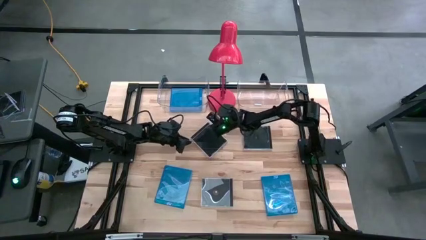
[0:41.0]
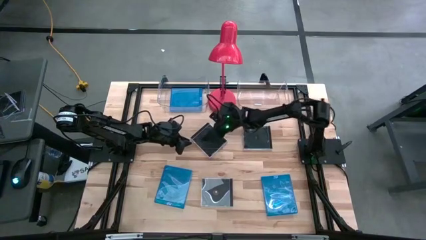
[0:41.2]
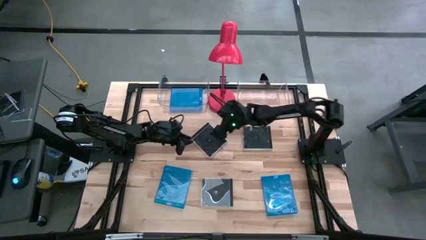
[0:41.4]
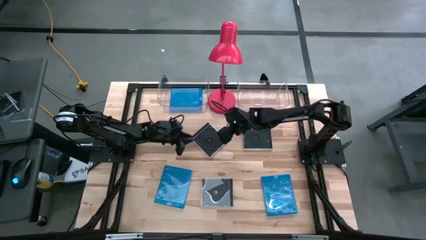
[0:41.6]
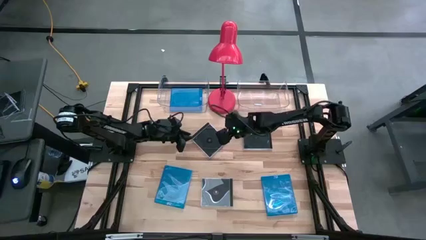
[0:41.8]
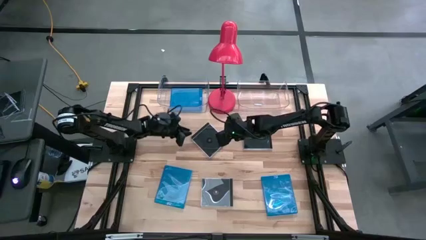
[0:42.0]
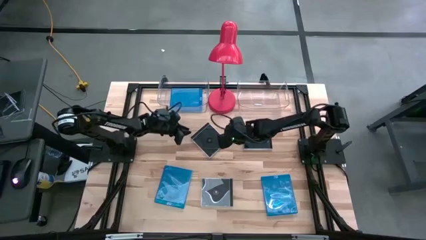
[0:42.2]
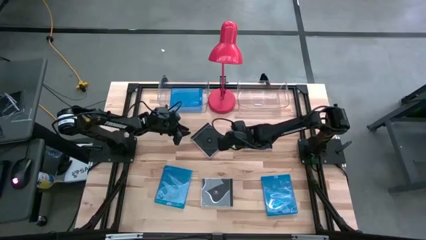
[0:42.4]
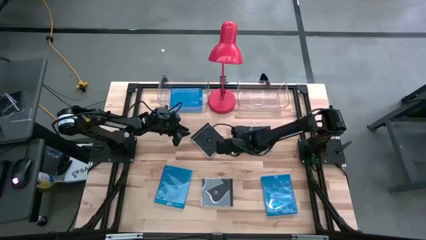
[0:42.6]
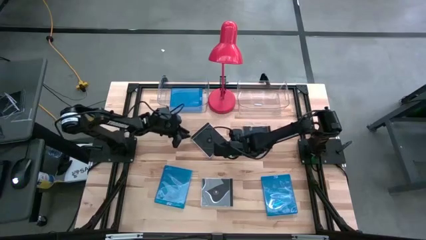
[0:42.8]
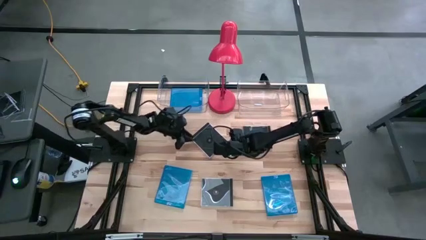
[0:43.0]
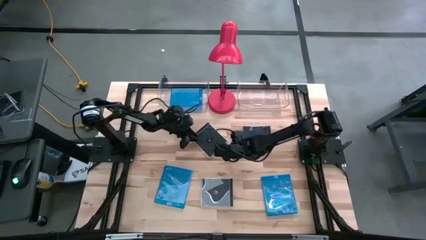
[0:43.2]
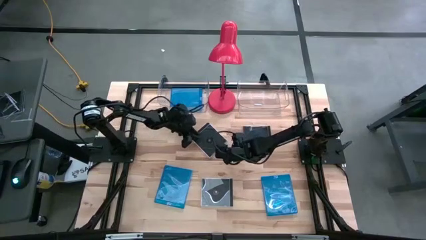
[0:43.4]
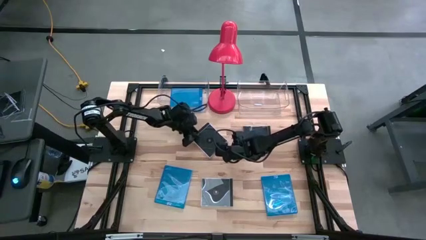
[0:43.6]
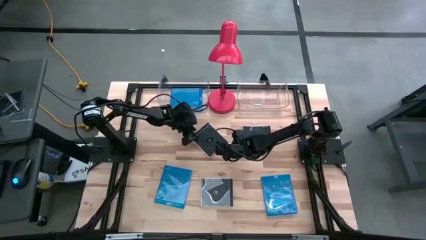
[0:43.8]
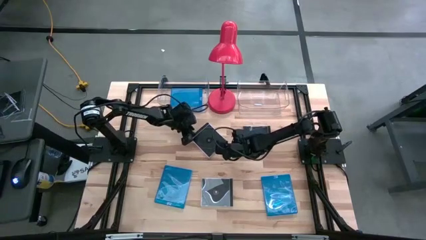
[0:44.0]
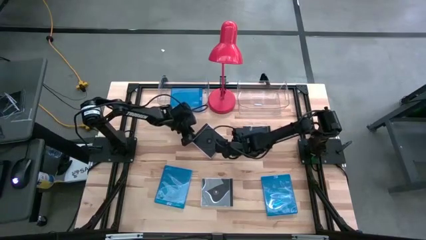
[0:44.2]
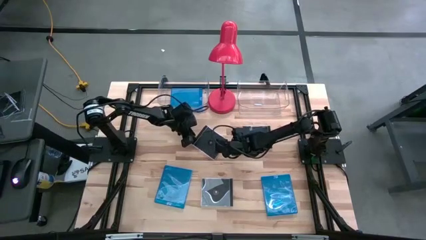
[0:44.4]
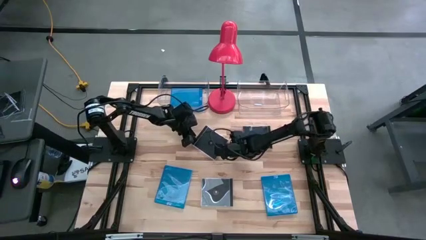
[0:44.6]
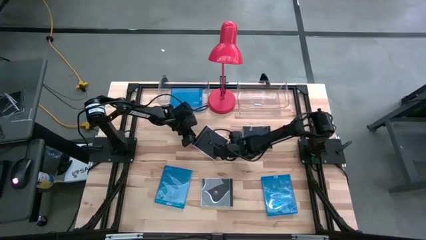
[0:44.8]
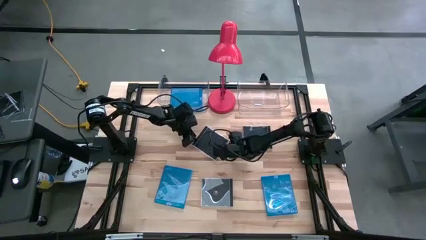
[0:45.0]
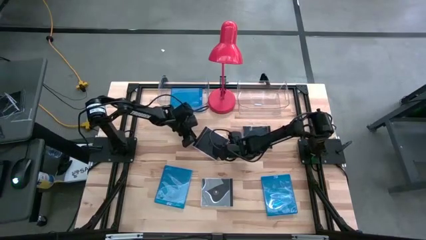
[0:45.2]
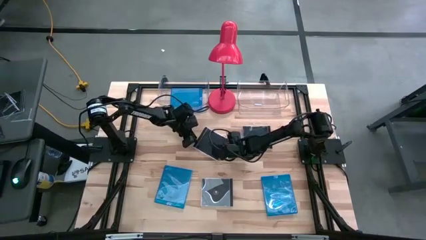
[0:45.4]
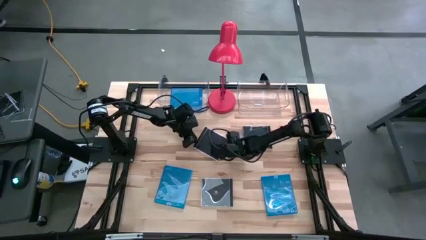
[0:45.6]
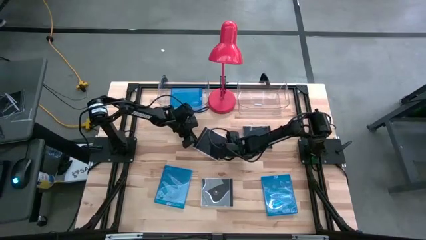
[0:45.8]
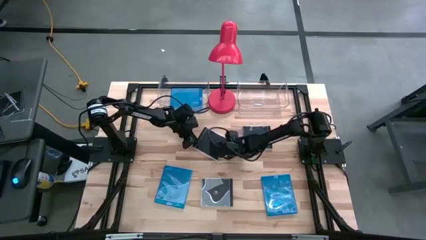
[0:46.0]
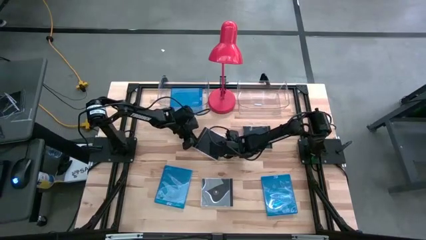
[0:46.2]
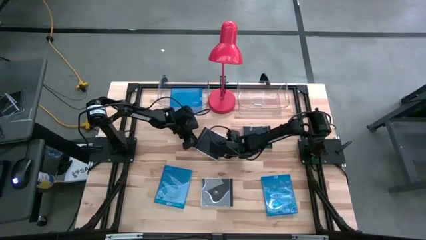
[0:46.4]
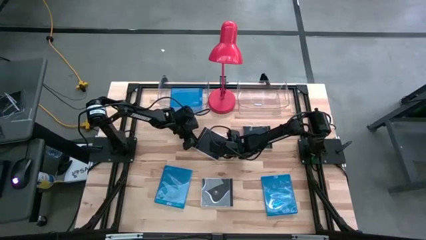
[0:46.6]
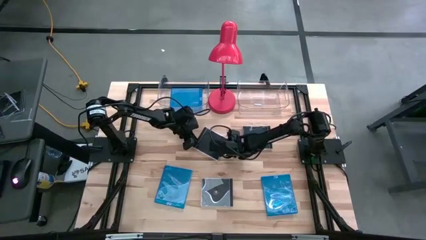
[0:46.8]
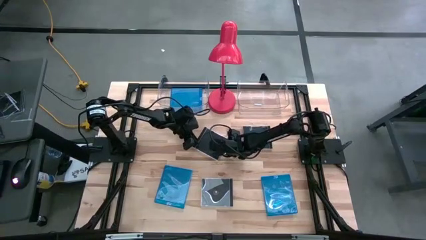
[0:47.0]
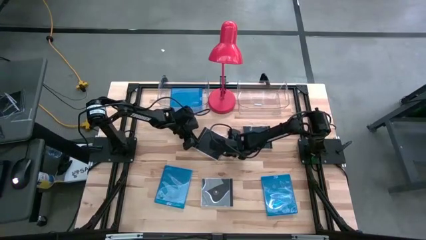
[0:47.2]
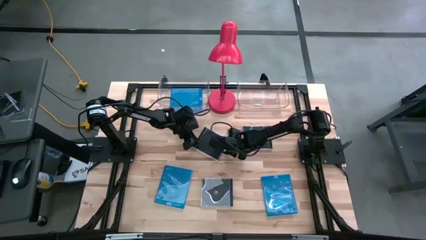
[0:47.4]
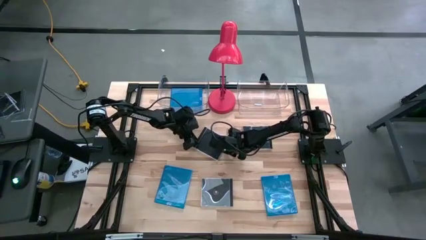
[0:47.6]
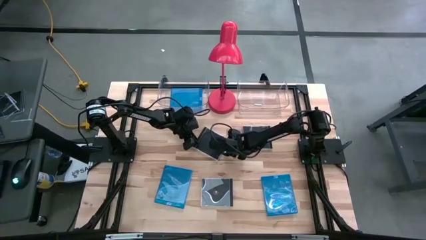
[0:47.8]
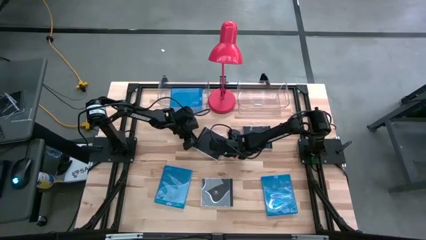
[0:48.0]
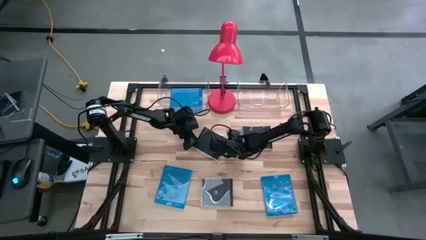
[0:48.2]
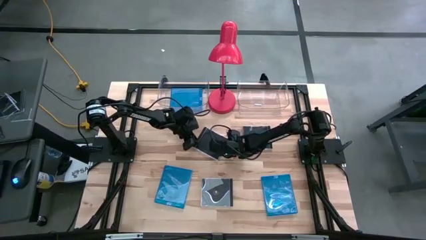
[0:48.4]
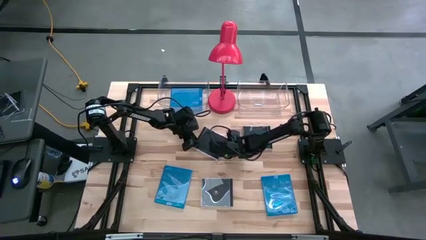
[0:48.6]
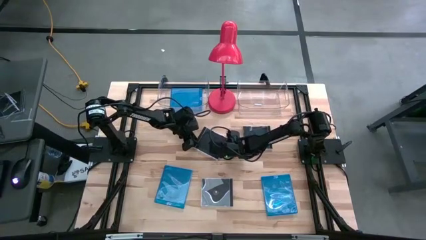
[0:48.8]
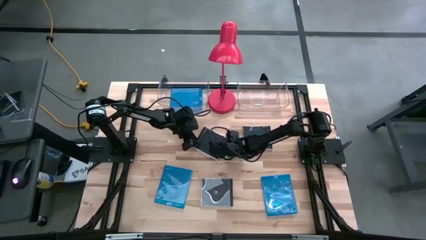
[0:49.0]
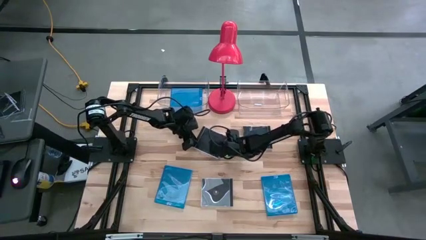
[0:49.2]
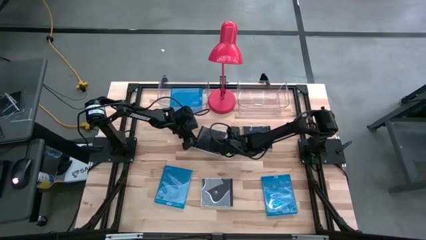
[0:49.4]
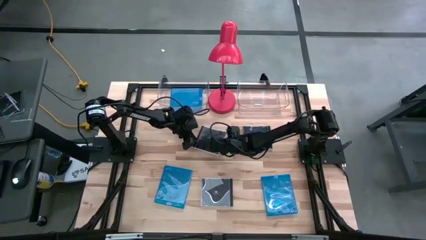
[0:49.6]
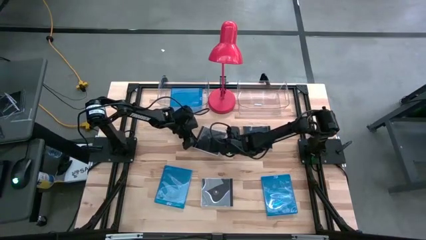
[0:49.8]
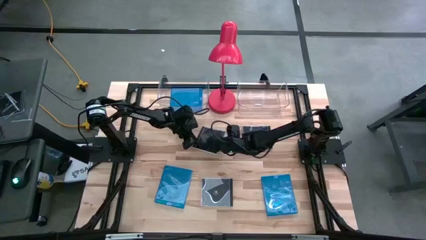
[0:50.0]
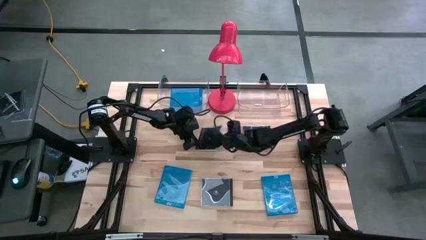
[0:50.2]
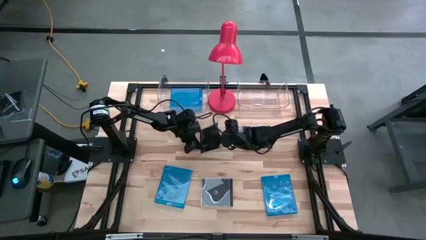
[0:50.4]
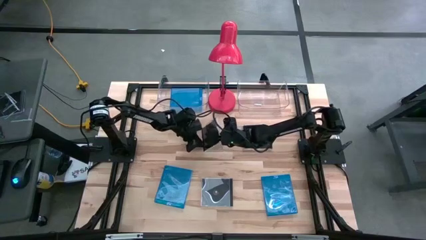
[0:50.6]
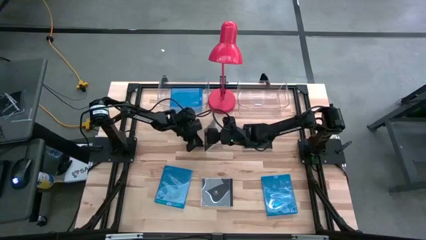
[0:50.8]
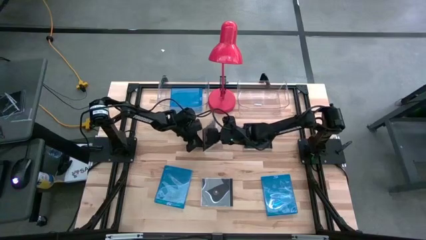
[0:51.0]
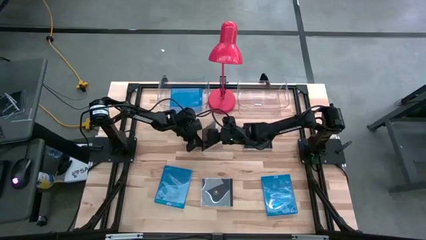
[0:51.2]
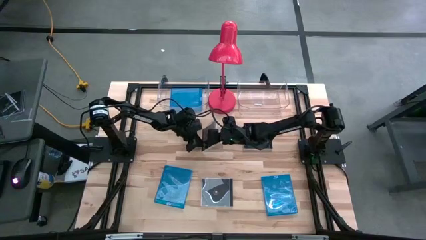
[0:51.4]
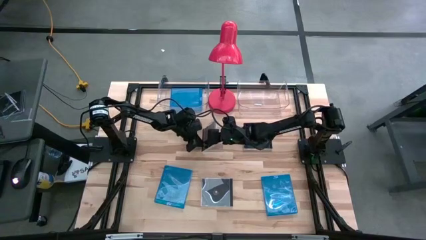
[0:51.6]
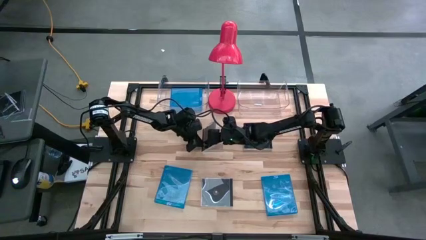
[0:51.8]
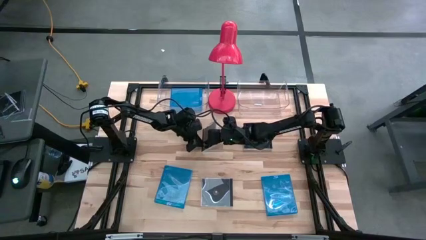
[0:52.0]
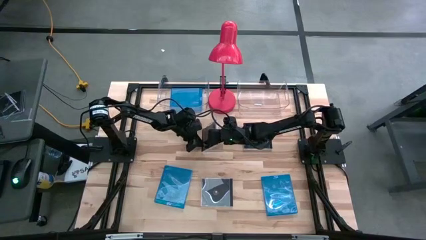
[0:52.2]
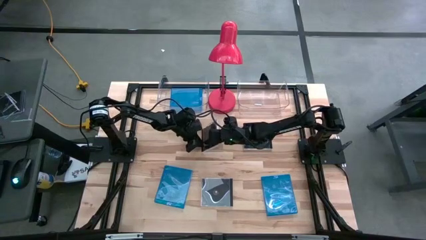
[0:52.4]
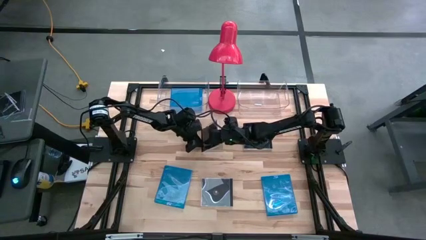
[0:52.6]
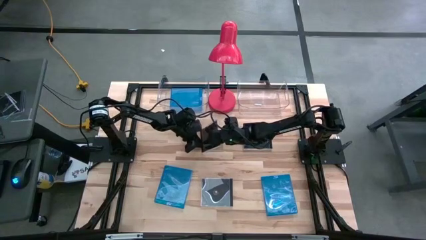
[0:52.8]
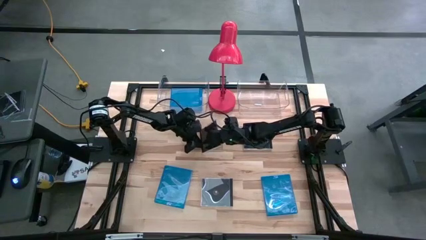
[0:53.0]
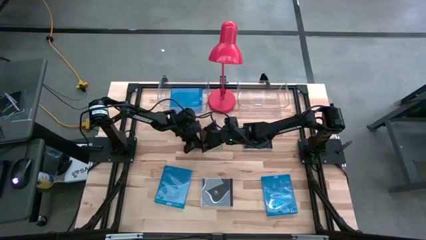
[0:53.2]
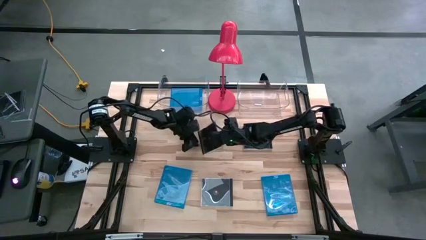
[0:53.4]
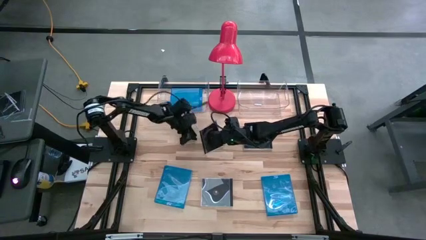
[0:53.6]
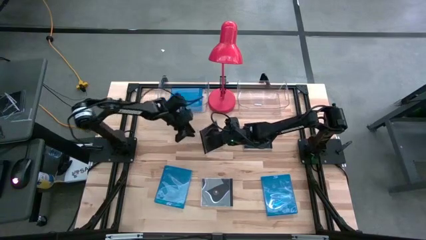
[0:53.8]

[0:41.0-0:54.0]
Task: Pick & place jewel cases by type
Put the left black cd case into the right transparent bin

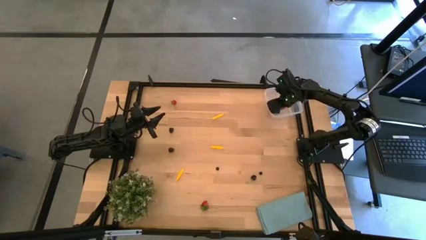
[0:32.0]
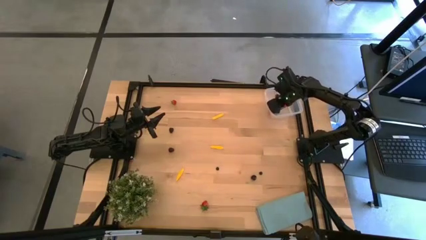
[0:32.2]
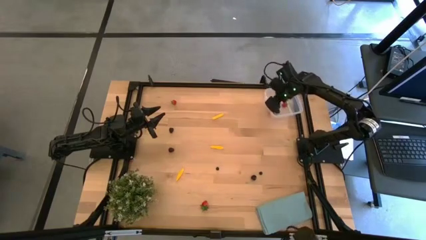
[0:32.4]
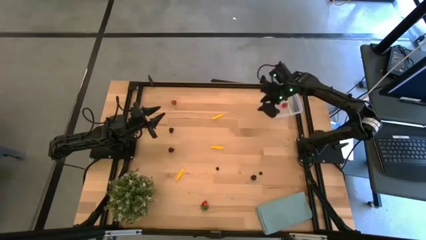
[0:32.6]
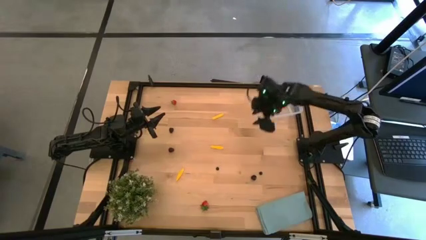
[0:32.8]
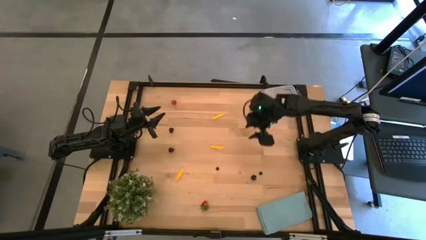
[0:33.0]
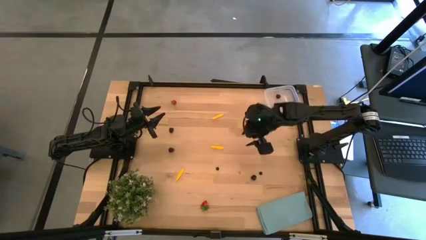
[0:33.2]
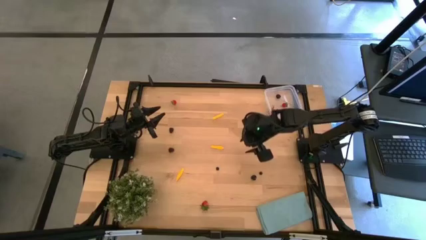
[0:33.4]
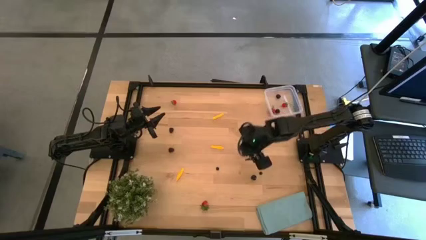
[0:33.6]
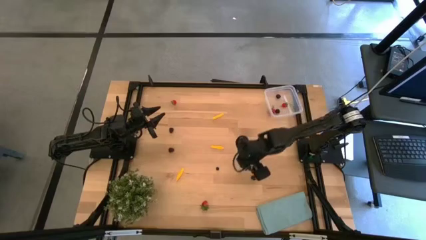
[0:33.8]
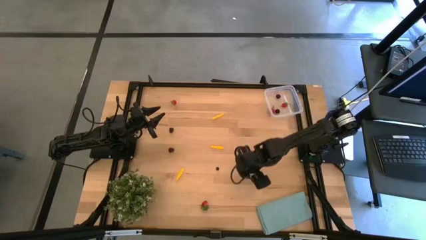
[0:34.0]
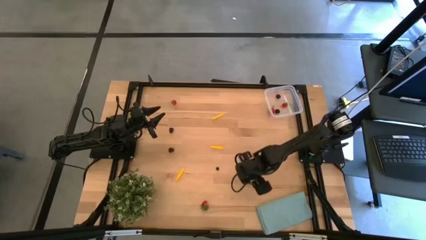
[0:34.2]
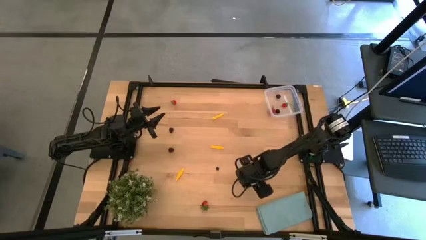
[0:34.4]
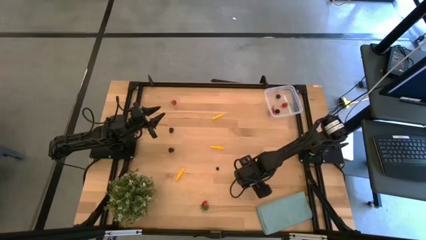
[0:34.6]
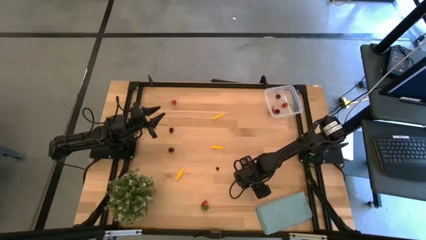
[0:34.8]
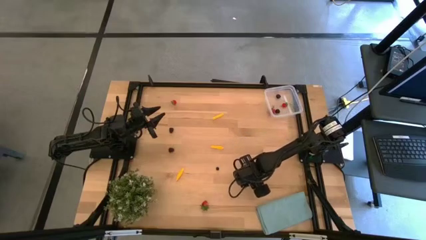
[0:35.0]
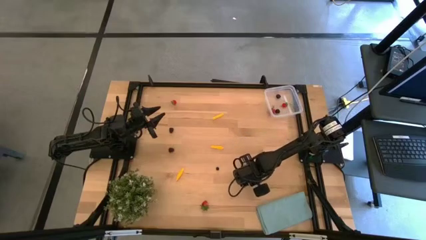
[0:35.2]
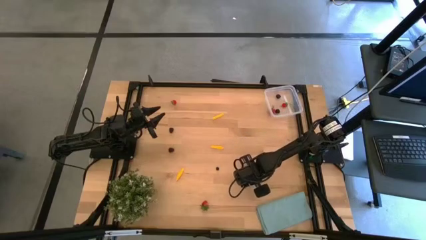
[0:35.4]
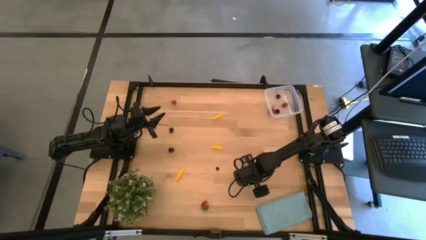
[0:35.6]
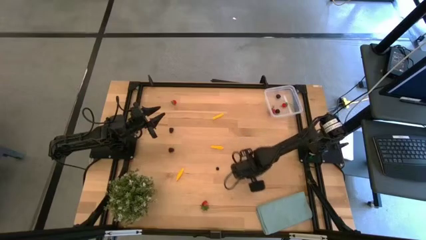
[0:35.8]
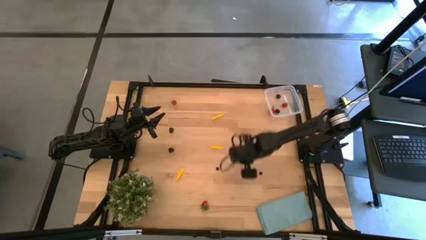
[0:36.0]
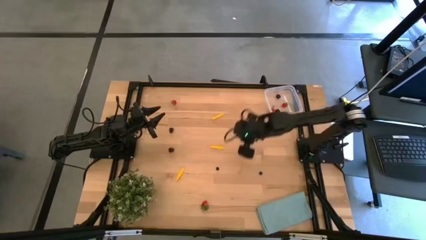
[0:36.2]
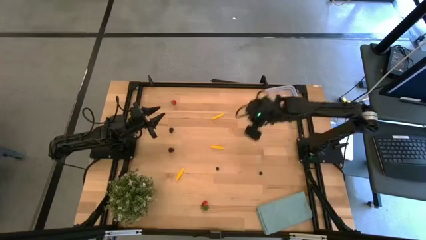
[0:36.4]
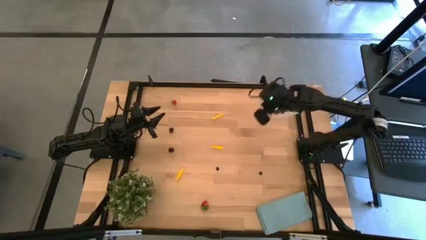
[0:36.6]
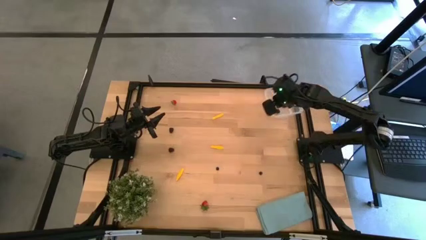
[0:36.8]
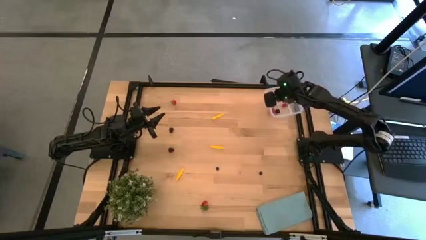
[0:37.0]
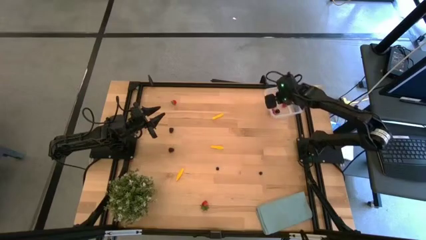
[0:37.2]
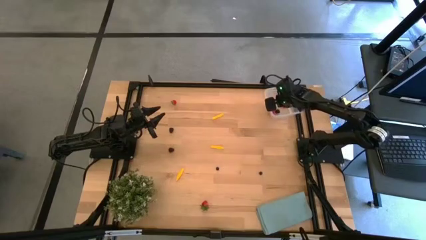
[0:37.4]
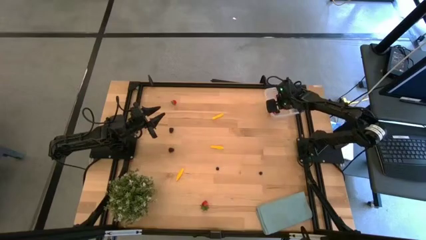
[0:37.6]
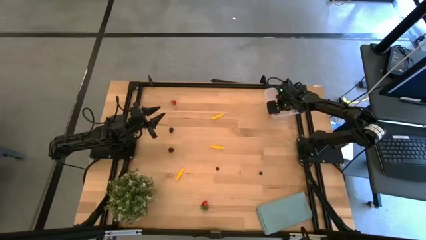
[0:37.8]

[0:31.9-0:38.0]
Task: Pick and placing Produce into tupperware
Put the black cherry into the transparent bin
